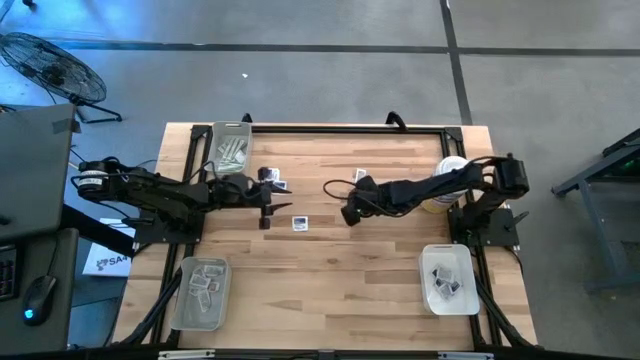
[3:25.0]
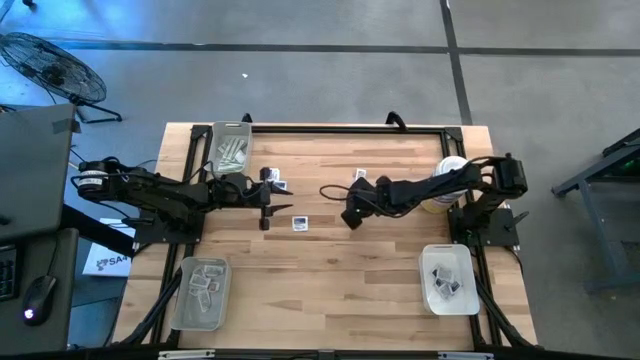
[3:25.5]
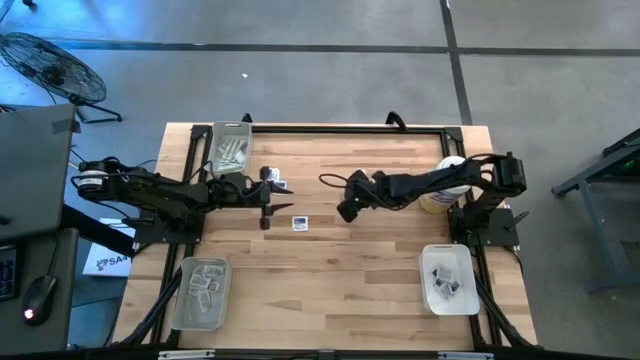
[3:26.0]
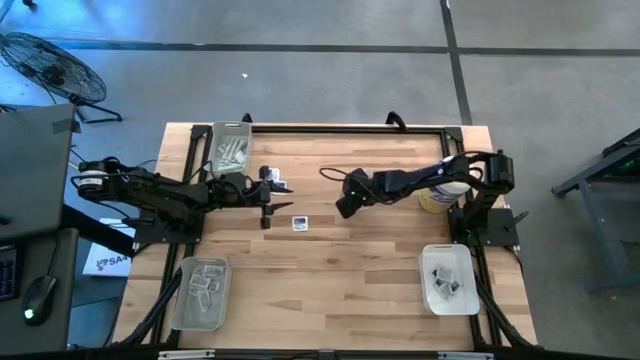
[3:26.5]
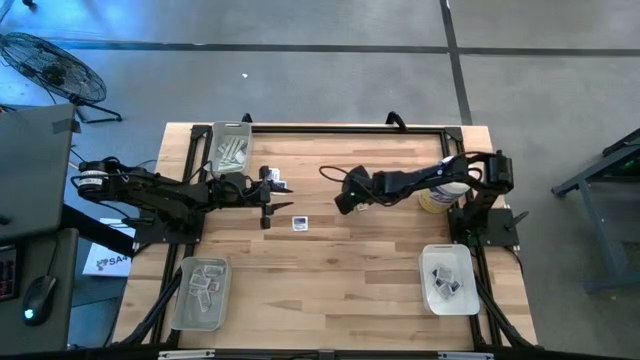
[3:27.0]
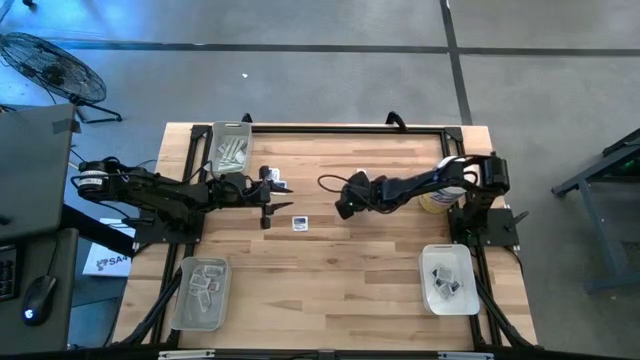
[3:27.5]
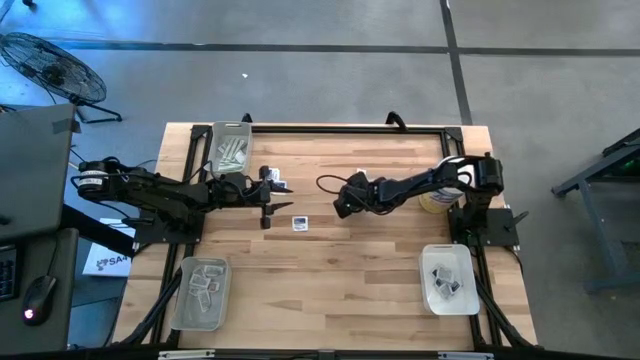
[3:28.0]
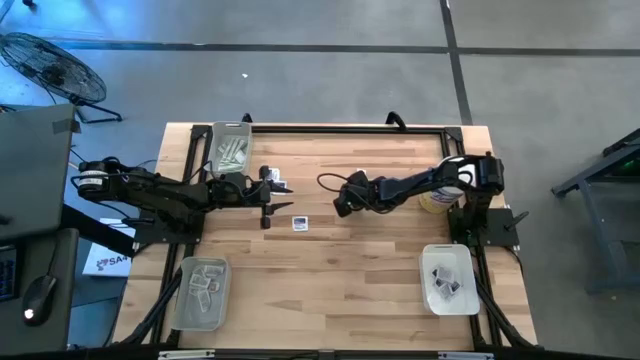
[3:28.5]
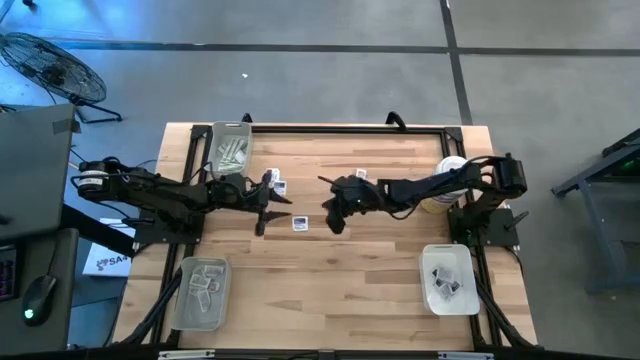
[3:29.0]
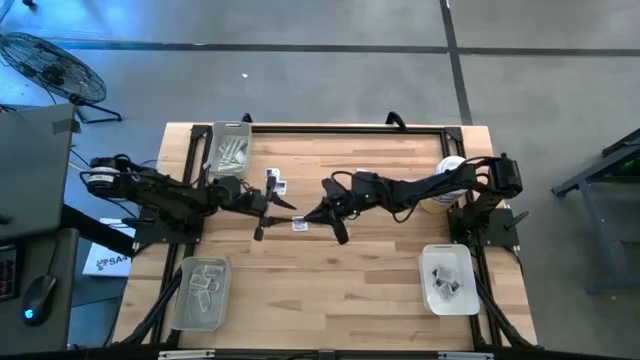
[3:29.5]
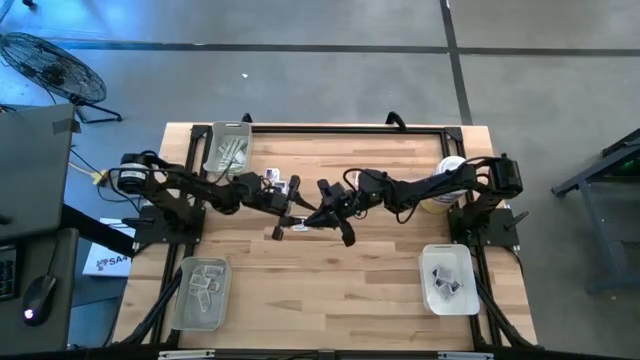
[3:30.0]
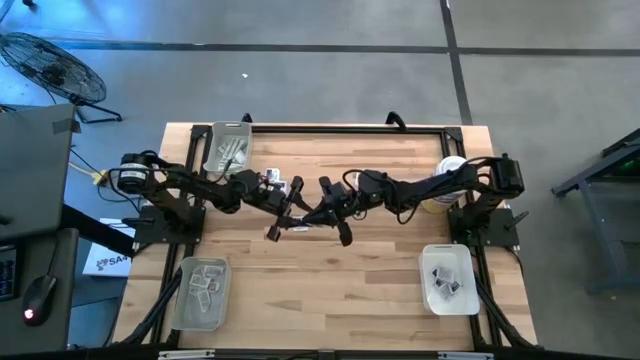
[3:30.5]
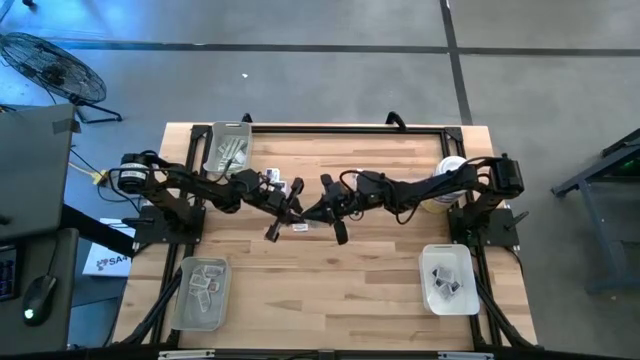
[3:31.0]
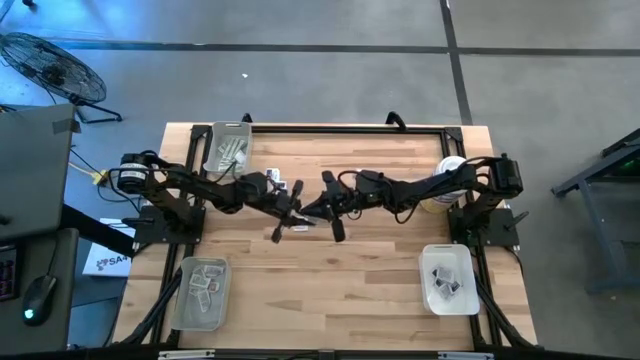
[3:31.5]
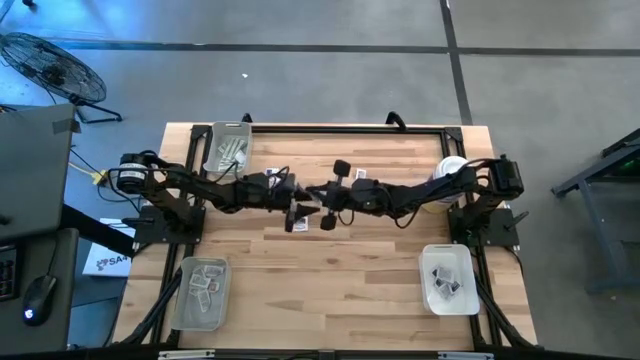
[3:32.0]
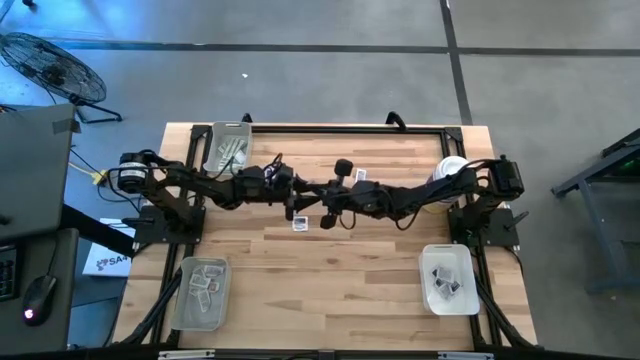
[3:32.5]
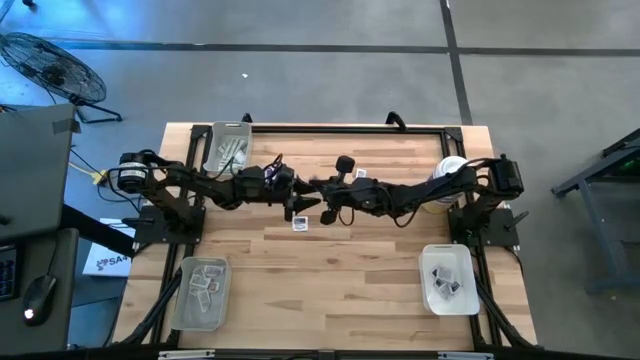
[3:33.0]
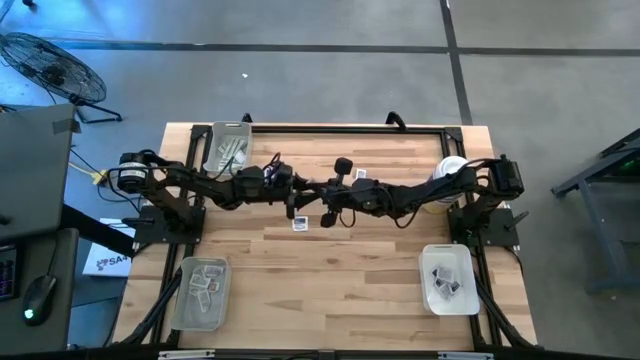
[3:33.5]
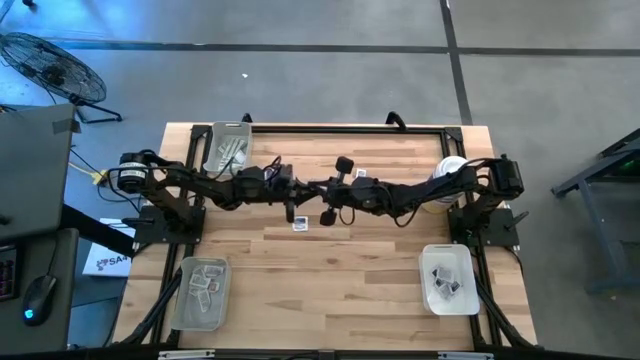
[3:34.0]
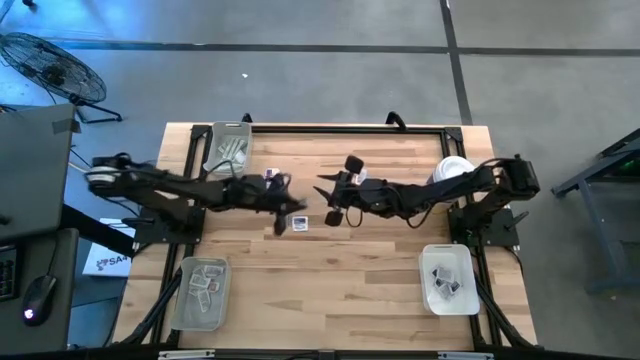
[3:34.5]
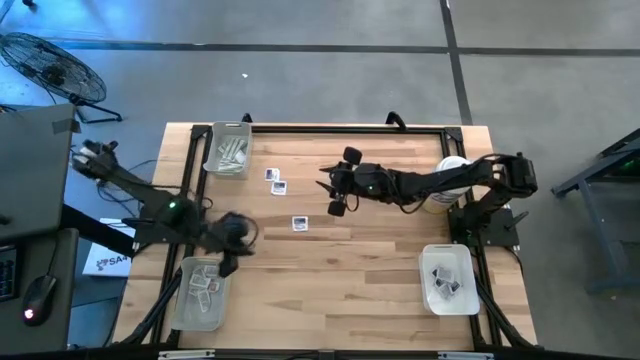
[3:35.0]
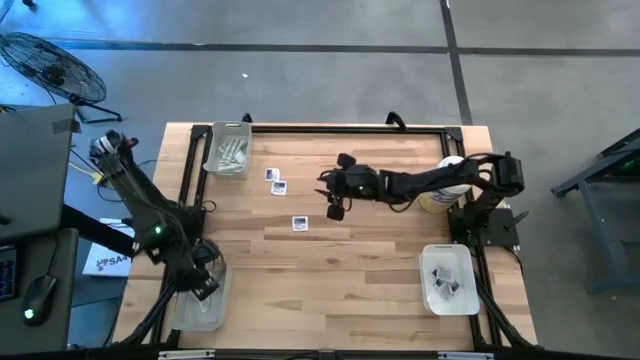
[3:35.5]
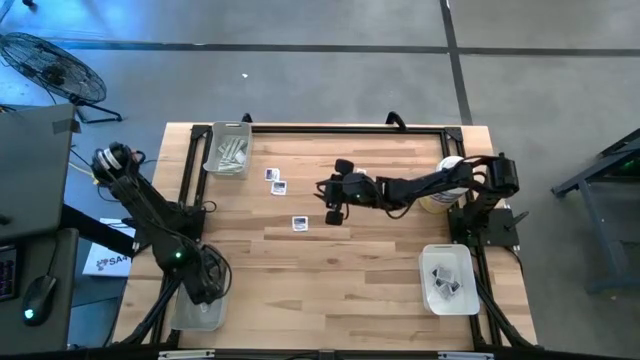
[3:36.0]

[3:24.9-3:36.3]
Task: Pick & Place First Aid Supplies
Put the bottom orange ointment pack into the bottom gray bin

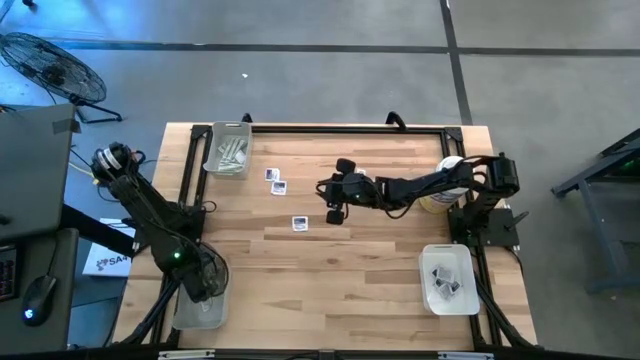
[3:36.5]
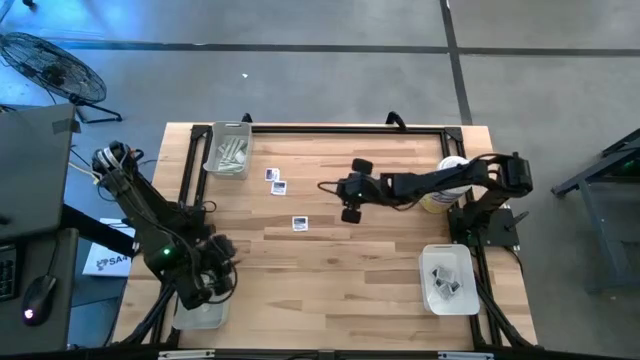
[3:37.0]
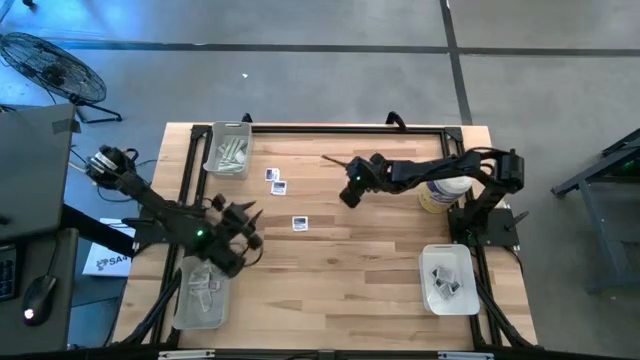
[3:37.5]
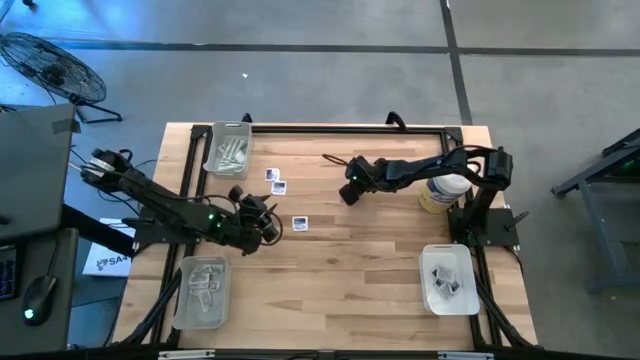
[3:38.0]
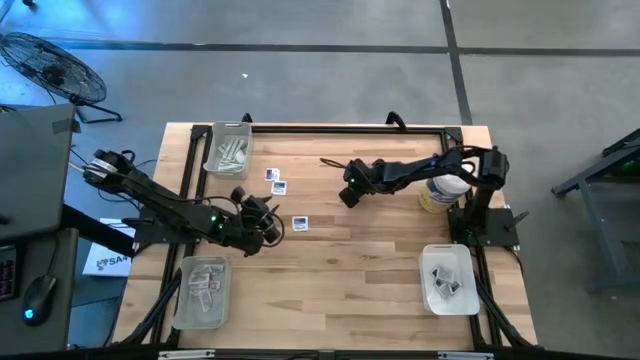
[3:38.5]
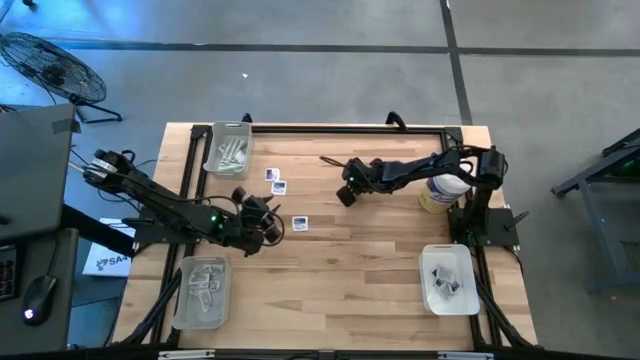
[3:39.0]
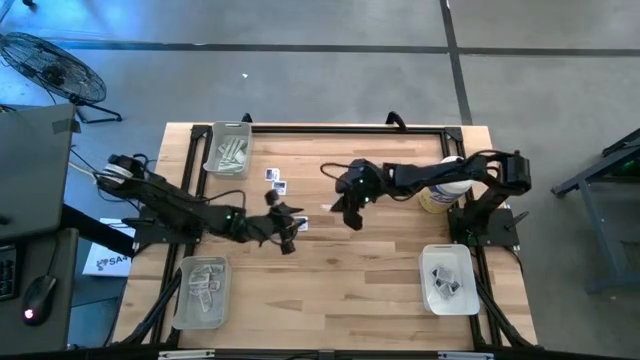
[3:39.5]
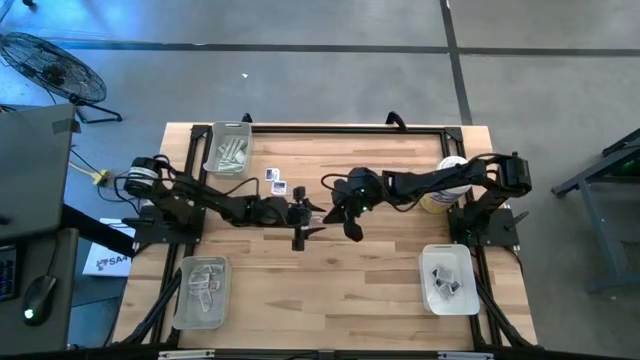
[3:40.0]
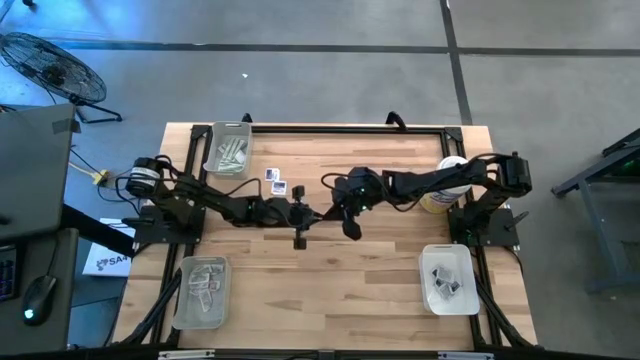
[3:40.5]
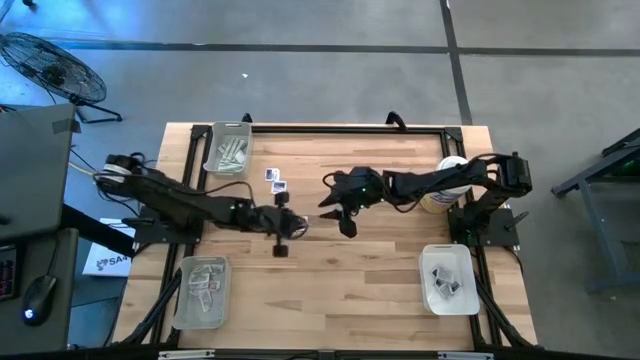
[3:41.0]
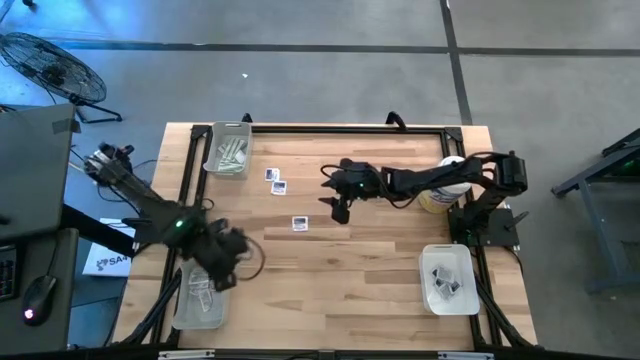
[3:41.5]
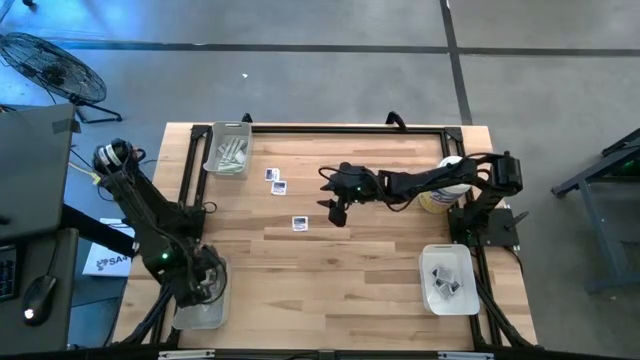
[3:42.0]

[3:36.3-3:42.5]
Put the orange ointment pack into the bottom gray bin

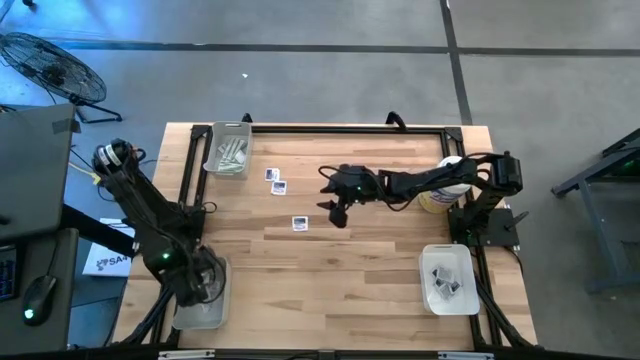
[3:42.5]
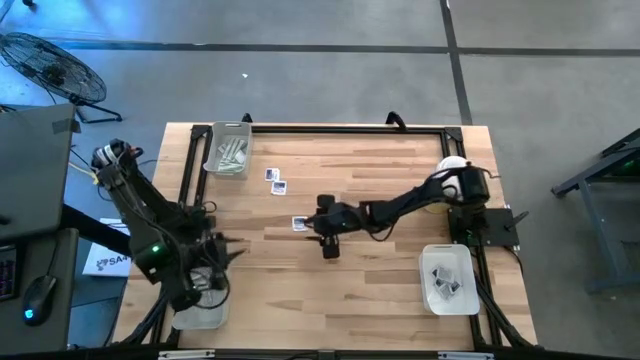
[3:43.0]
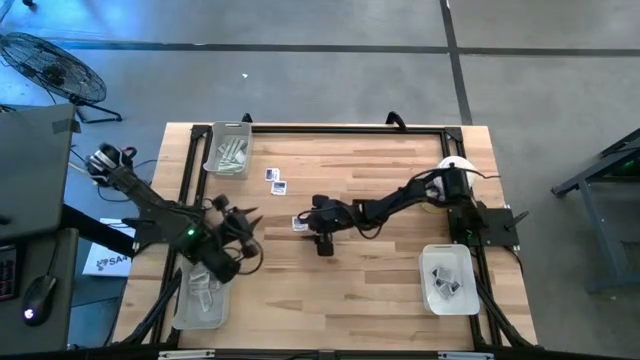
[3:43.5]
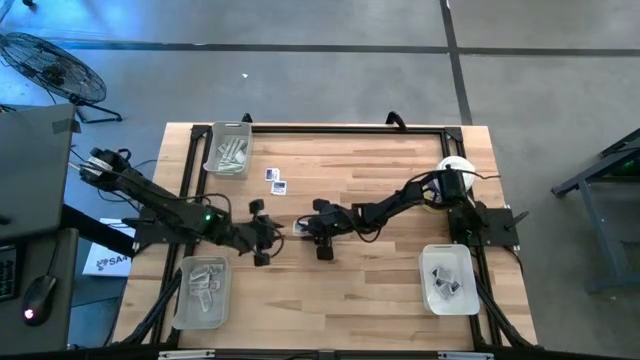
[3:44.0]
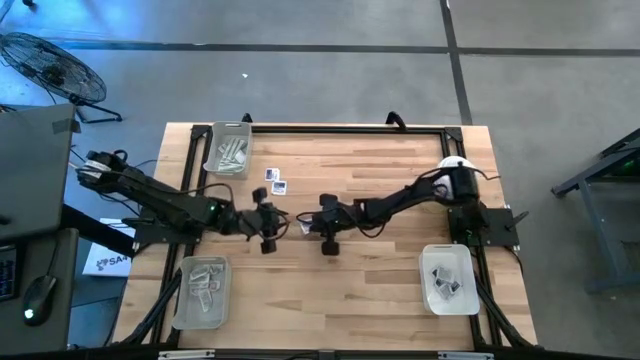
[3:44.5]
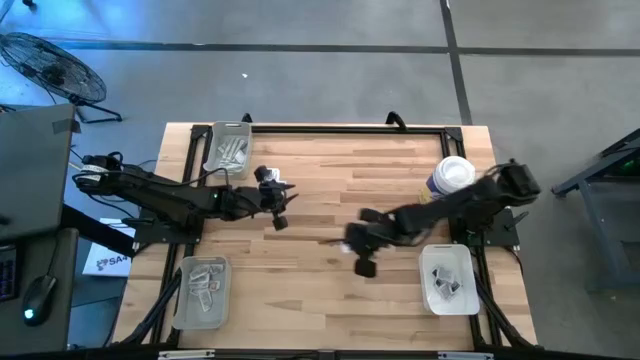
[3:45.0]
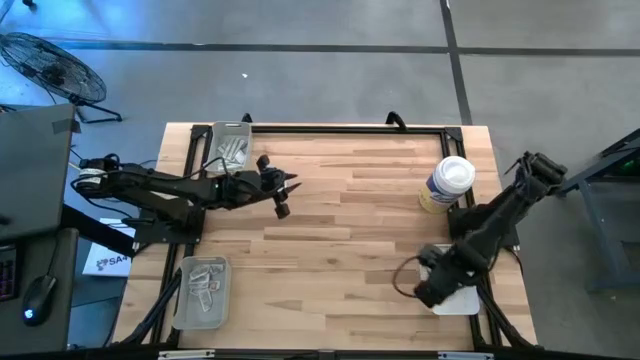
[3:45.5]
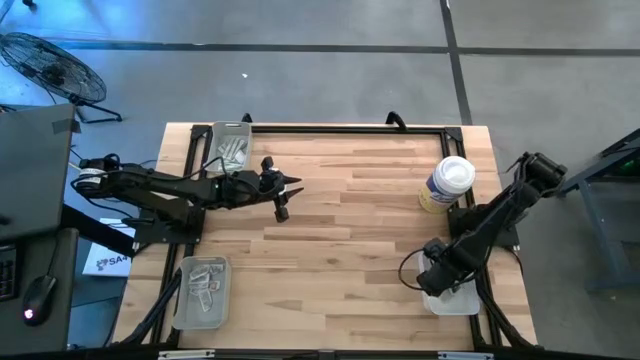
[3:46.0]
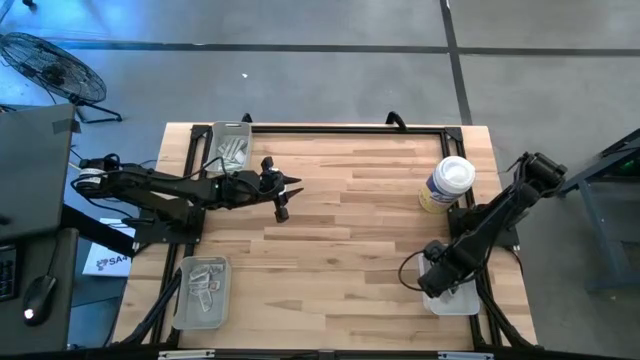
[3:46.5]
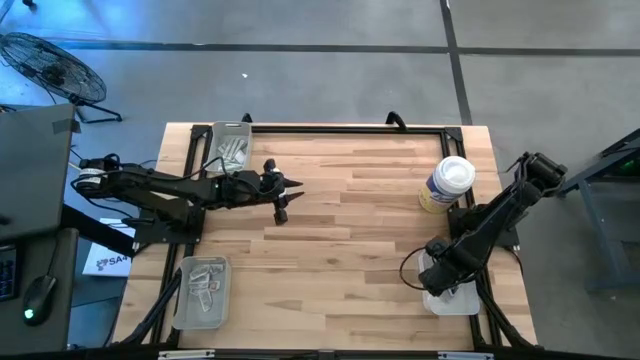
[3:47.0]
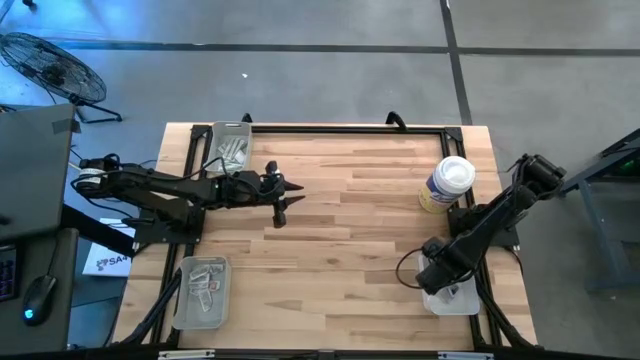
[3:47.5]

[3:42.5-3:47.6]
Put the bottom blue alcohol pad into the white bin
